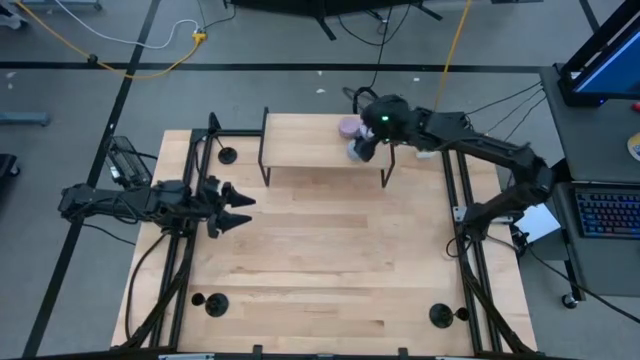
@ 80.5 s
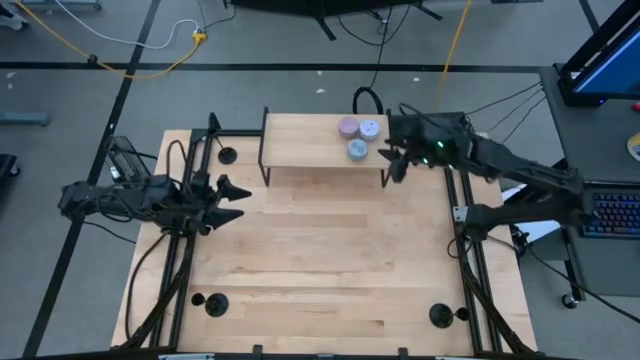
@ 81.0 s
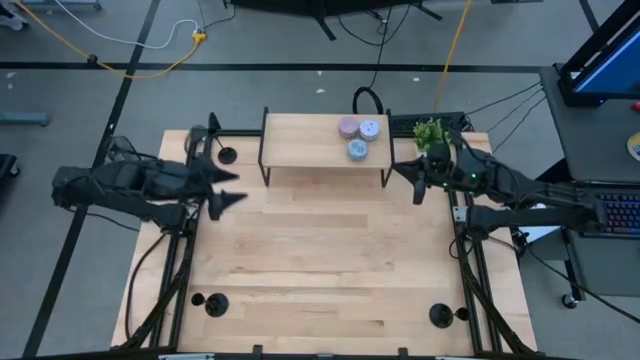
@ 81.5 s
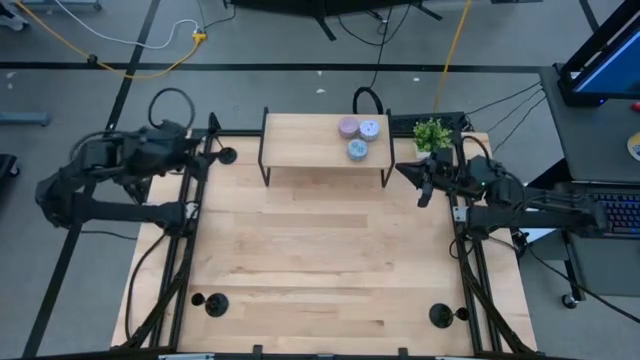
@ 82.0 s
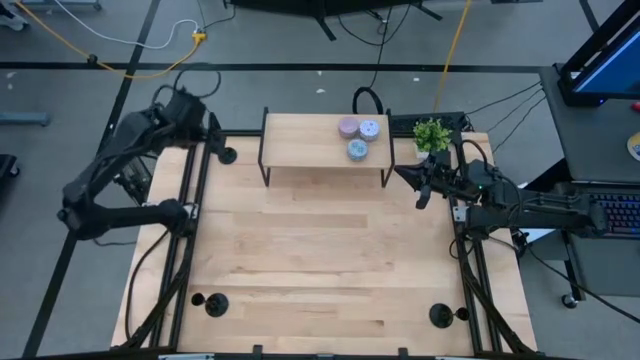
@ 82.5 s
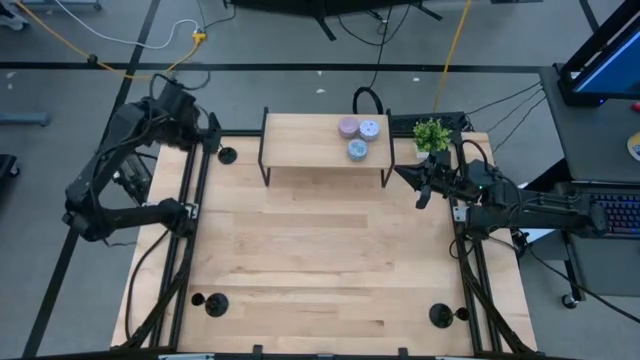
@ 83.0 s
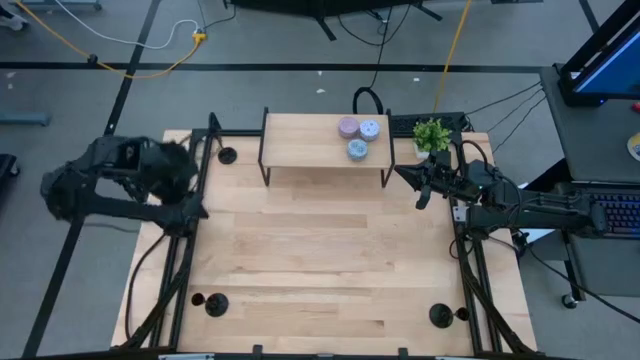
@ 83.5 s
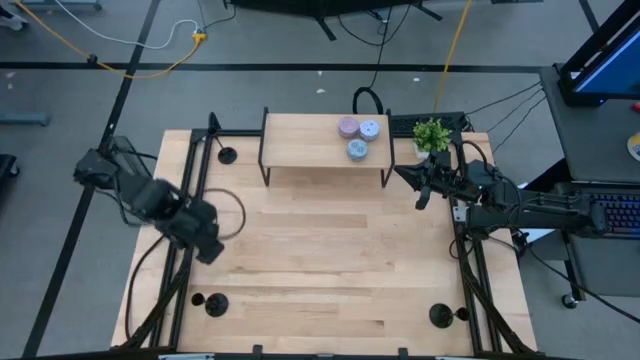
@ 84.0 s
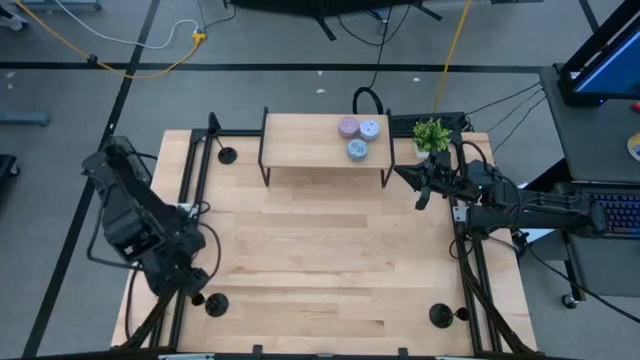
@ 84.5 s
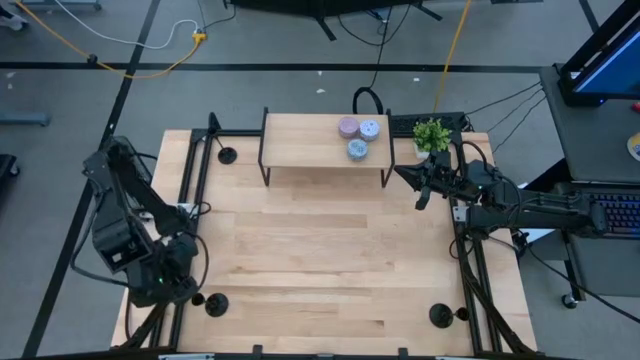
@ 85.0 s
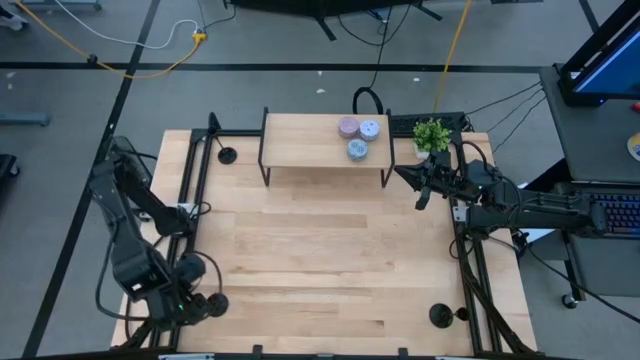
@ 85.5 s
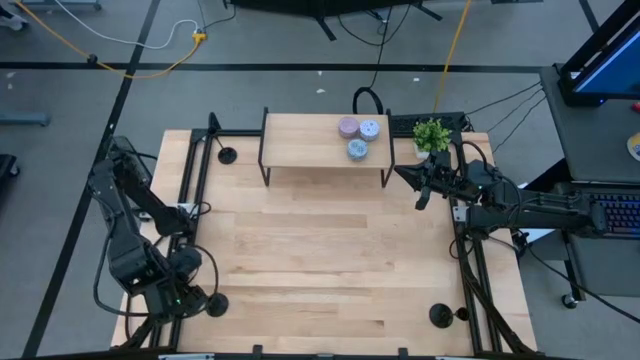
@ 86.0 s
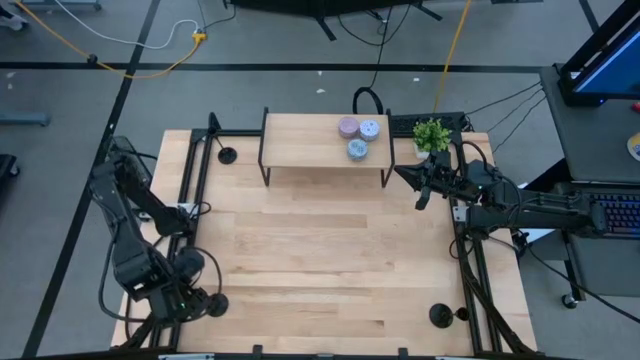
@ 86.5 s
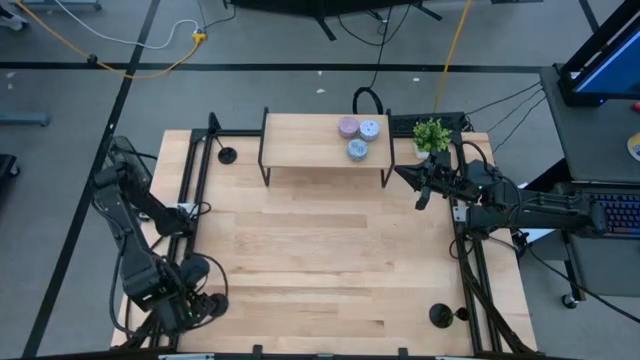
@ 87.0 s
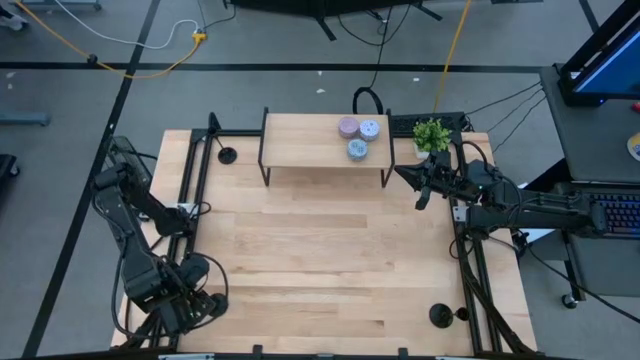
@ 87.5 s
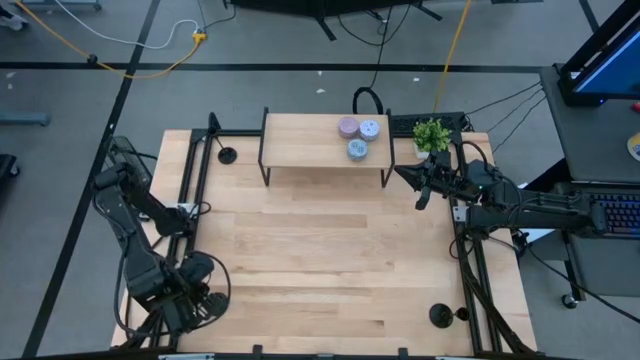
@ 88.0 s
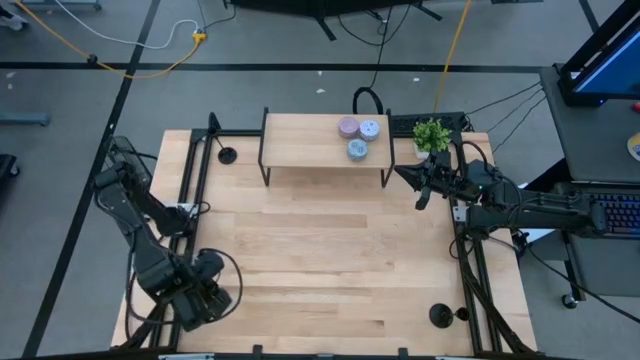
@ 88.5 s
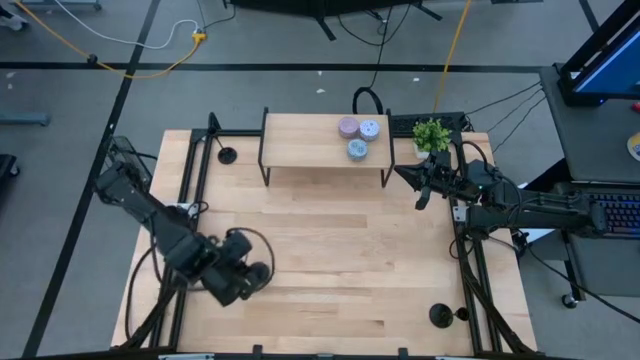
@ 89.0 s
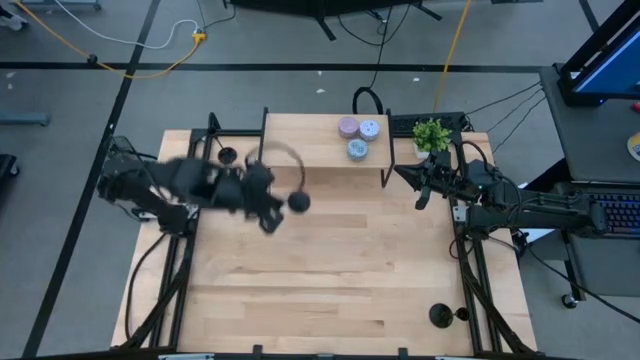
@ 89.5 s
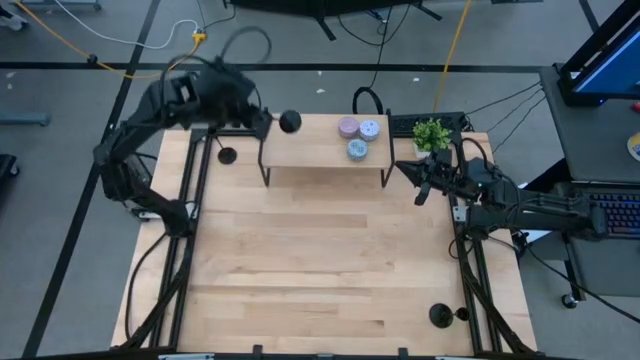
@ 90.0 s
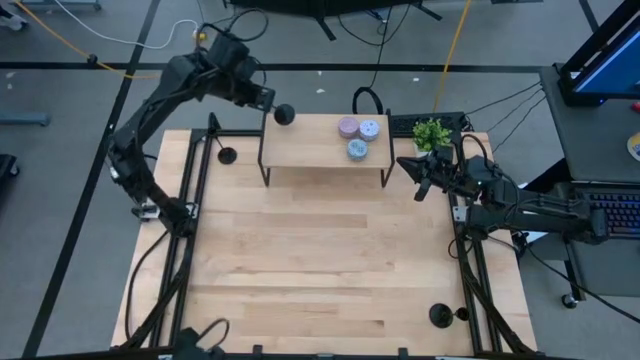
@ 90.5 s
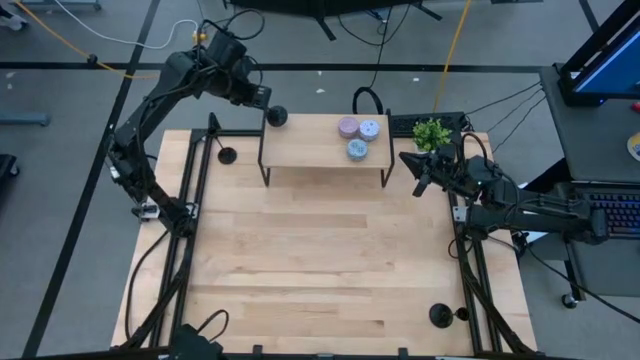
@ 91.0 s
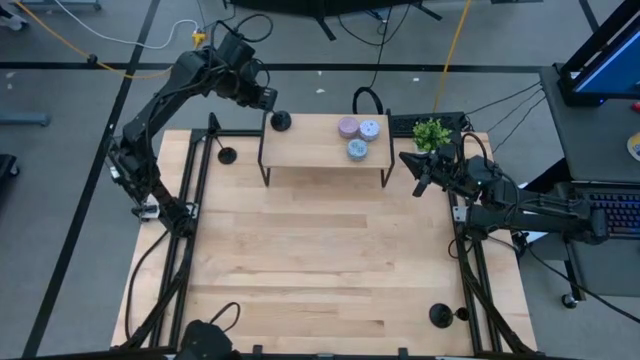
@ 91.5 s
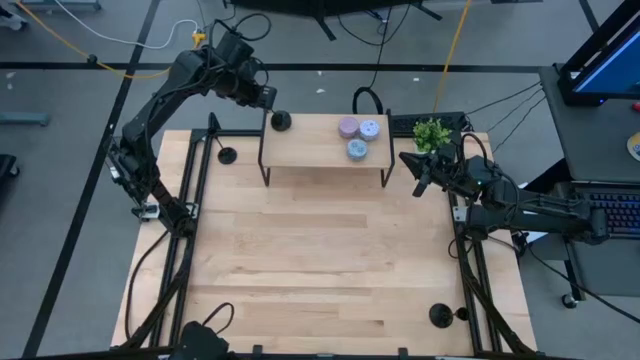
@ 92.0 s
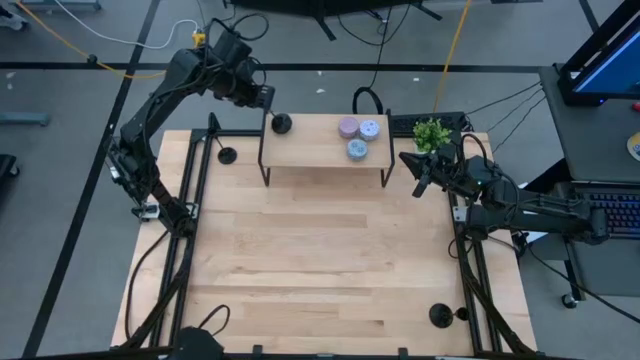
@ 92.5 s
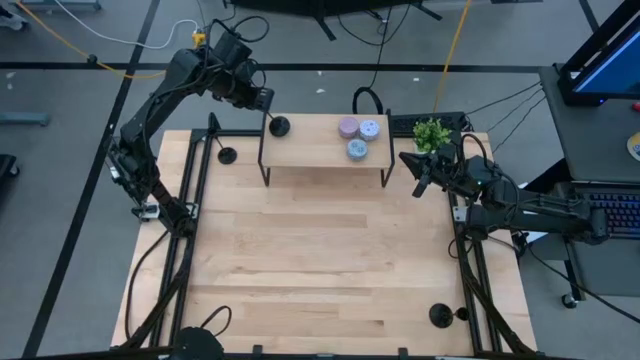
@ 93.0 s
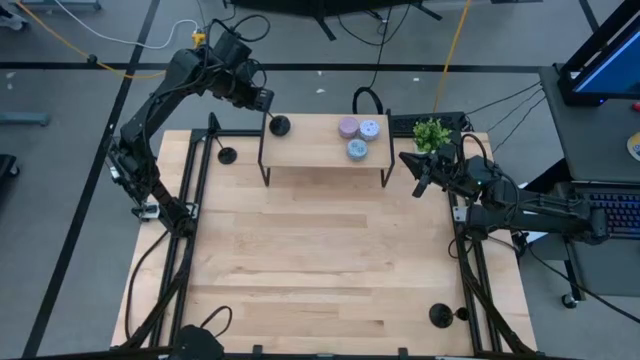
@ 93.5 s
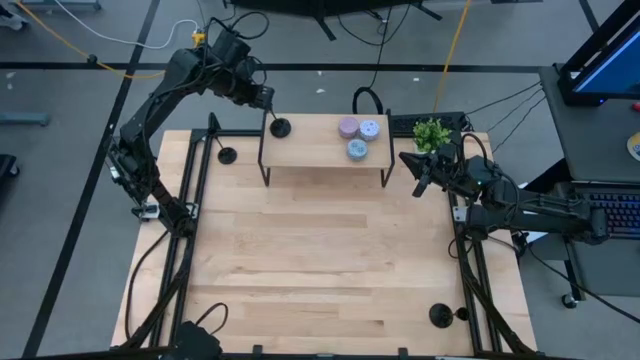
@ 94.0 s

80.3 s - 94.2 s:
Task: Pick & Place candle stick holders
Put the bottom left black candle holder on the shelf

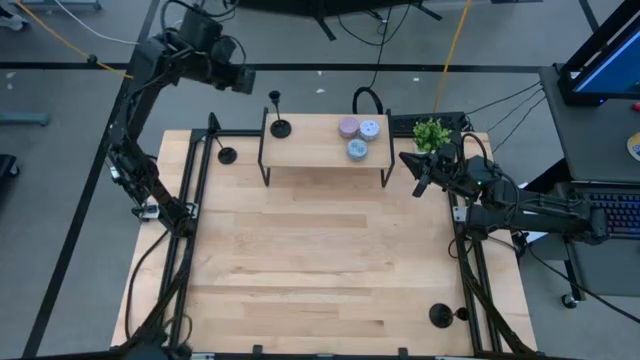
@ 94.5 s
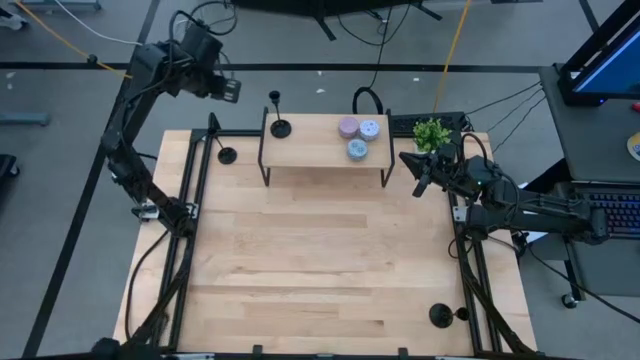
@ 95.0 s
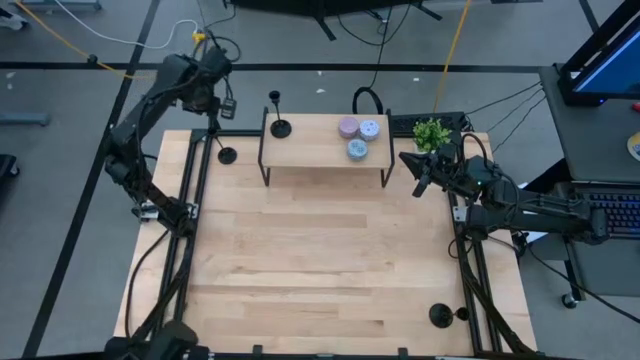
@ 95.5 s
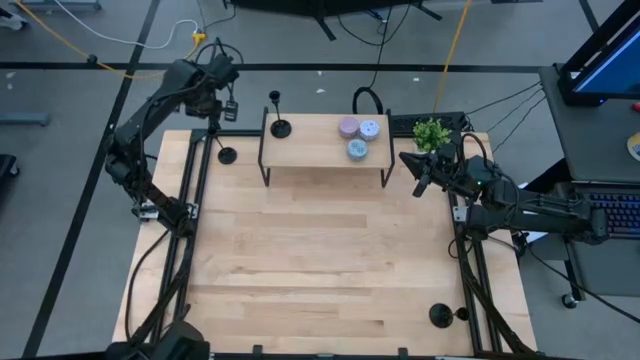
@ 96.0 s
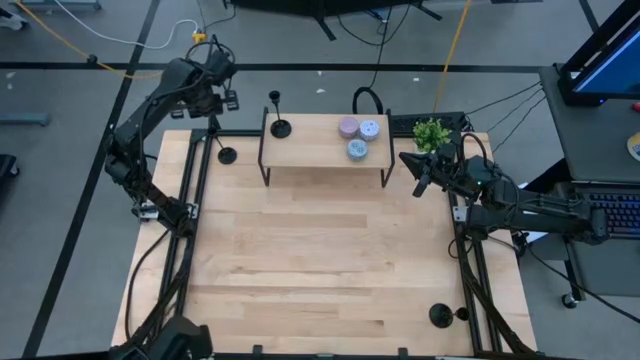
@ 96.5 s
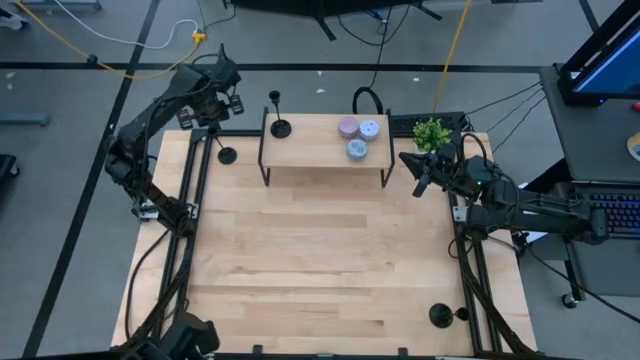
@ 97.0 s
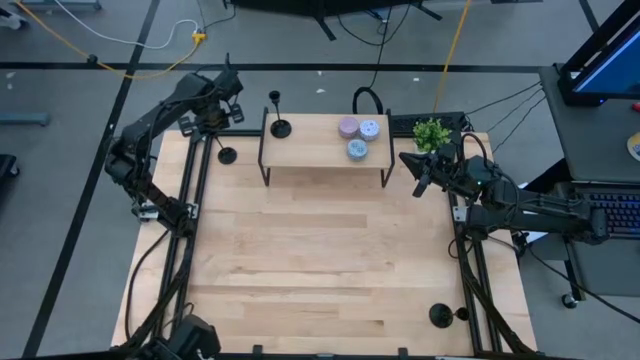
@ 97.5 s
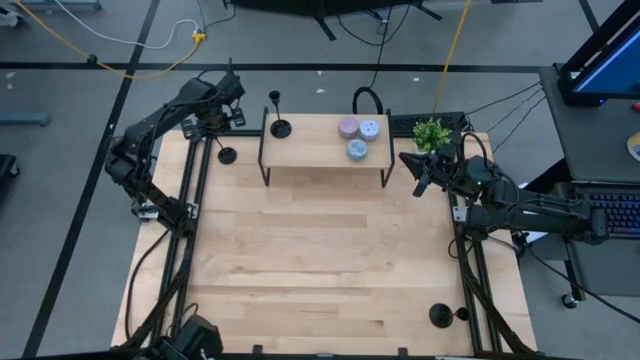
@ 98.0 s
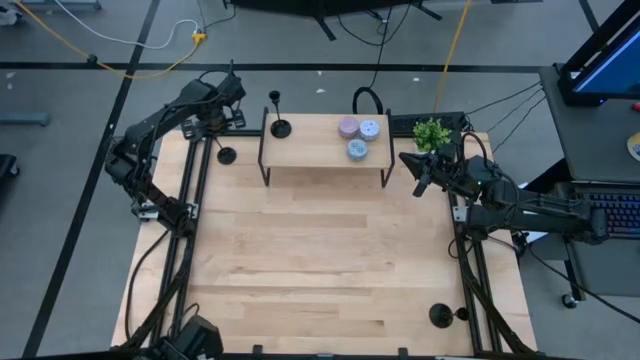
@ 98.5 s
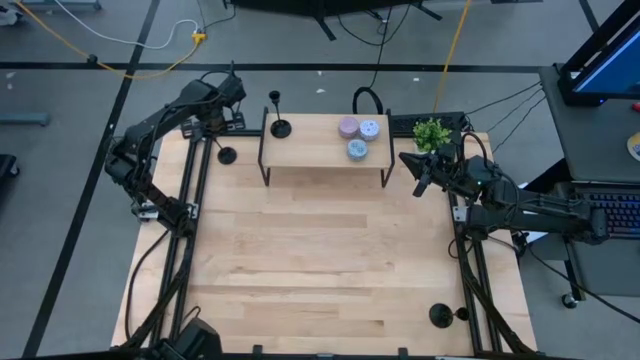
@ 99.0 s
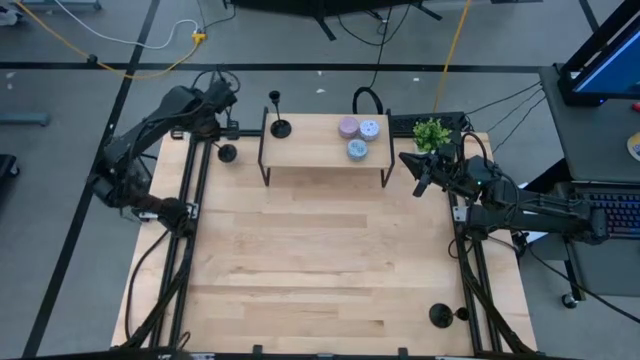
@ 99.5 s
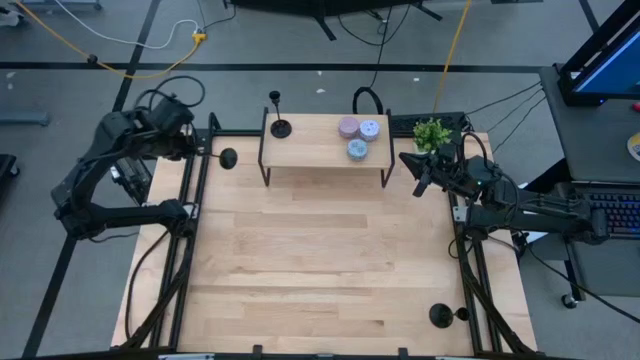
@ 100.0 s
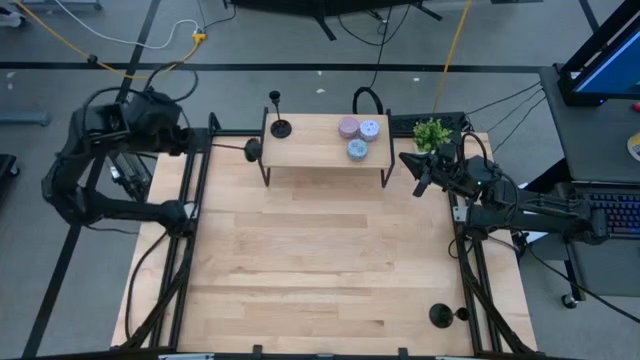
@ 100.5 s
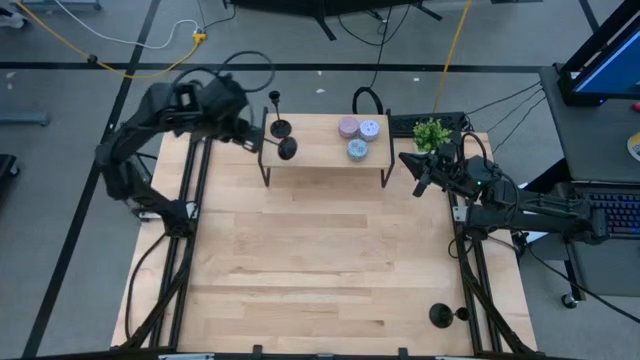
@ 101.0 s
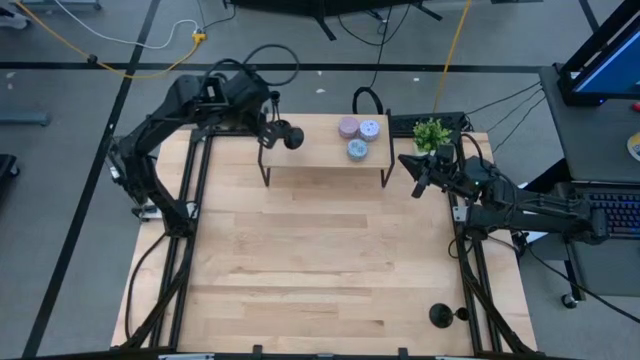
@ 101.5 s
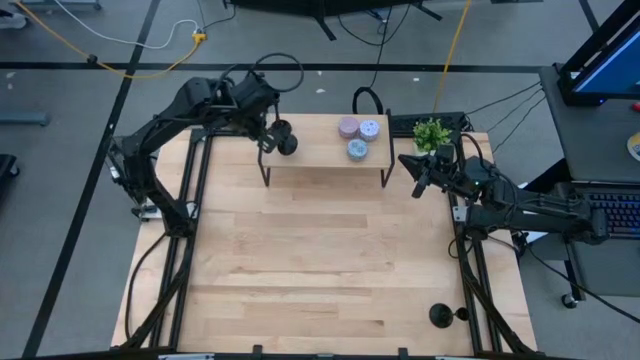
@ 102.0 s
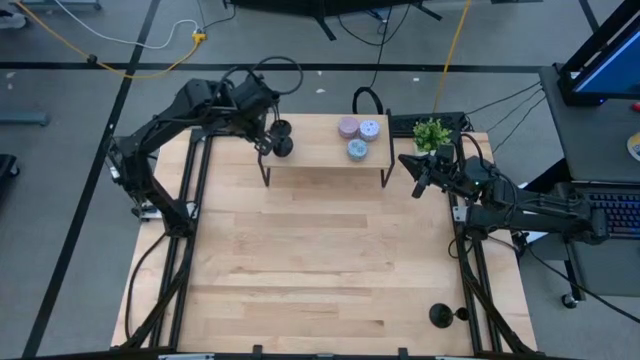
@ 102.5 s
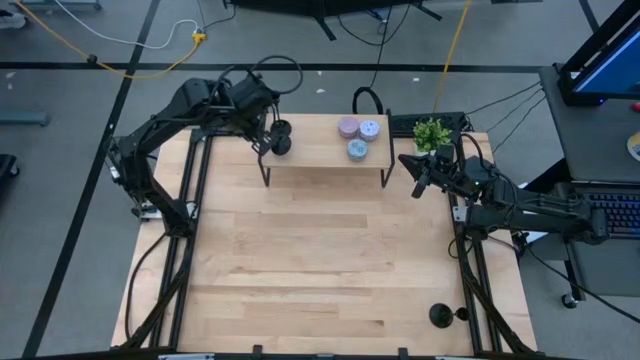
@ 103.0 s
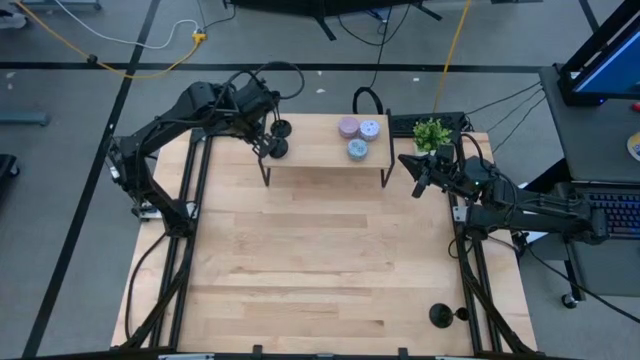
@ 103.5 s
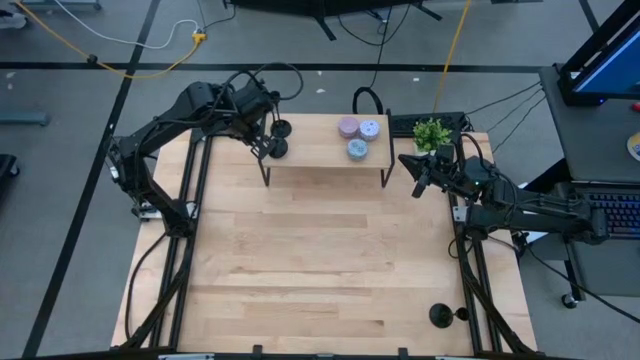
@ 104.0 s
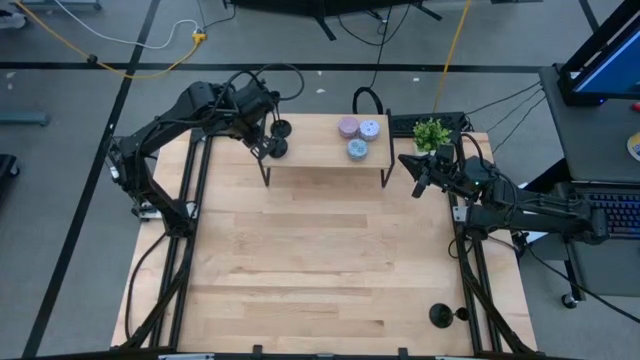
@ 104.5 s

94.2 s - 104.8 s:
Put the top black candle holder on the shelf
